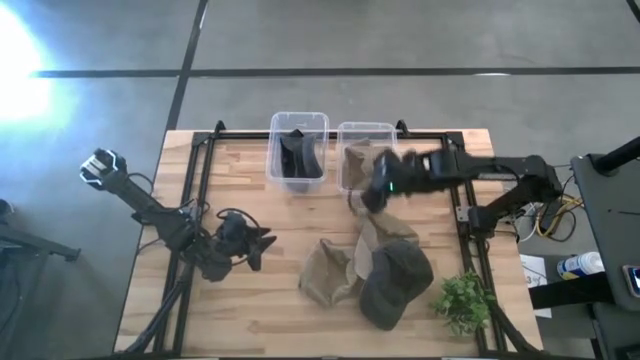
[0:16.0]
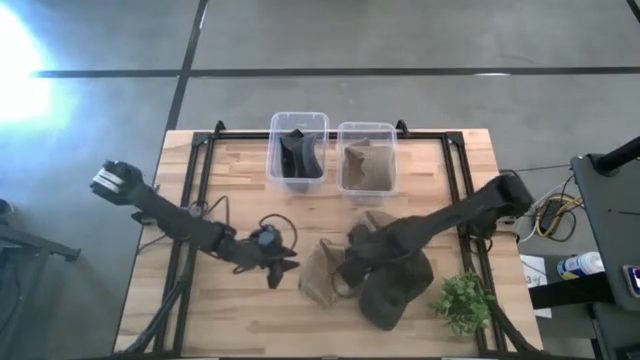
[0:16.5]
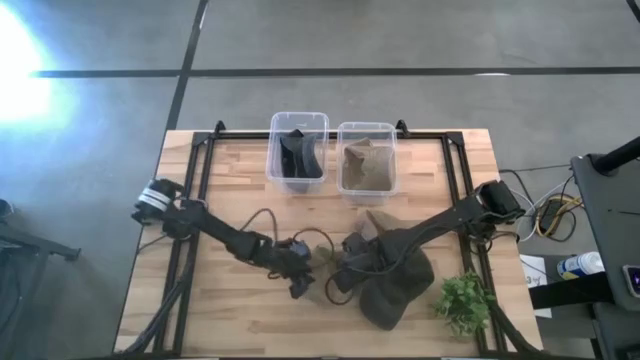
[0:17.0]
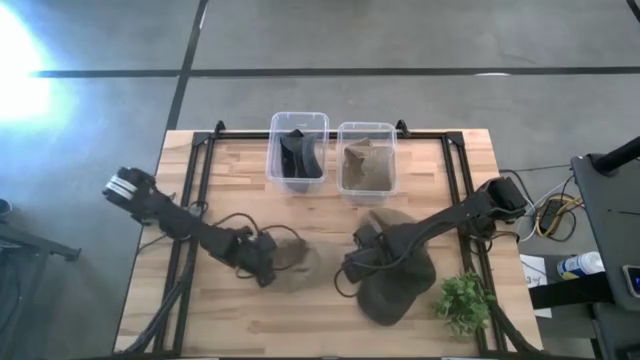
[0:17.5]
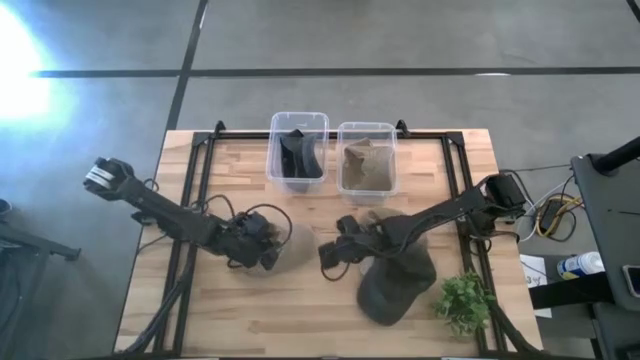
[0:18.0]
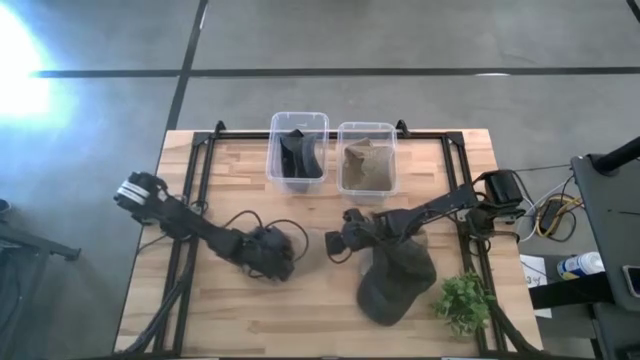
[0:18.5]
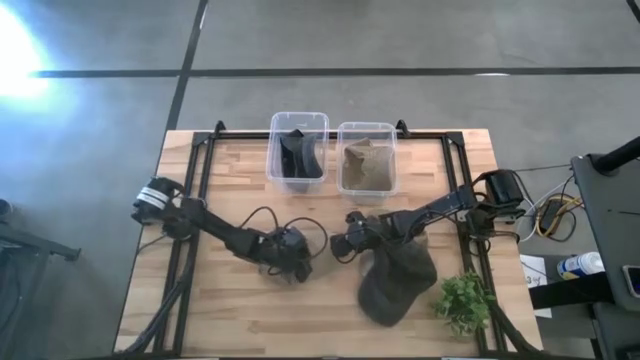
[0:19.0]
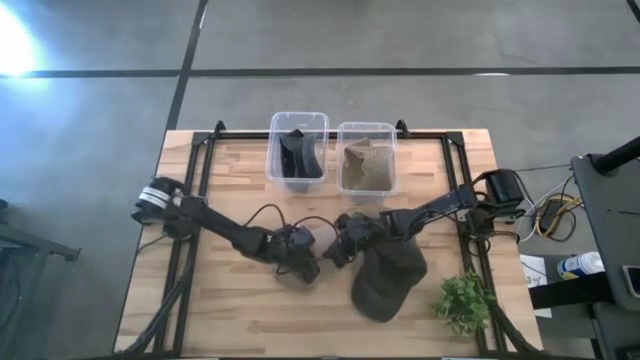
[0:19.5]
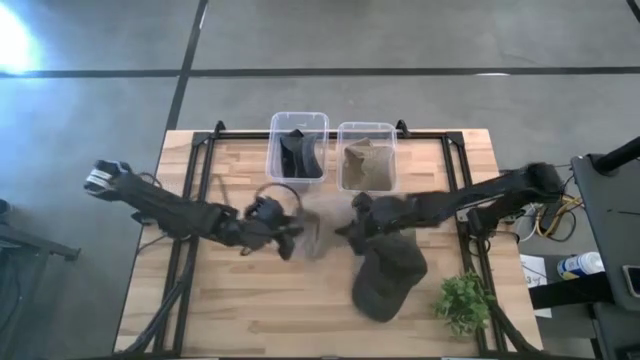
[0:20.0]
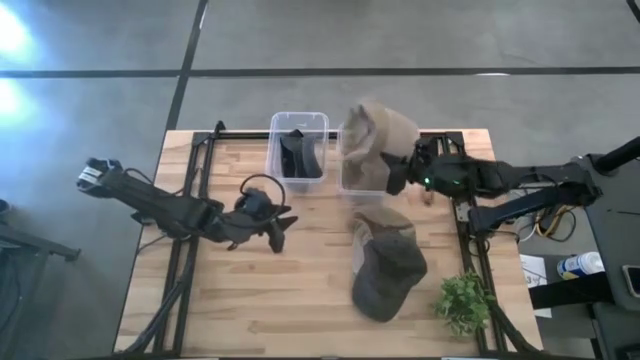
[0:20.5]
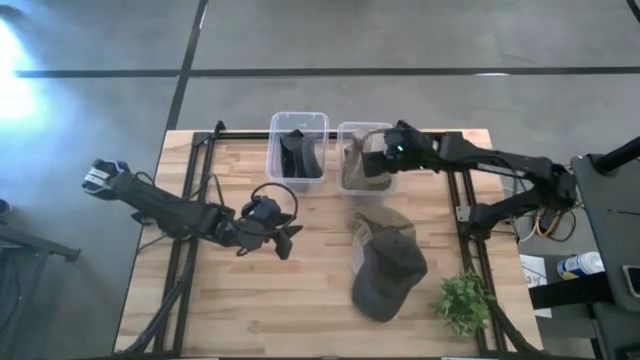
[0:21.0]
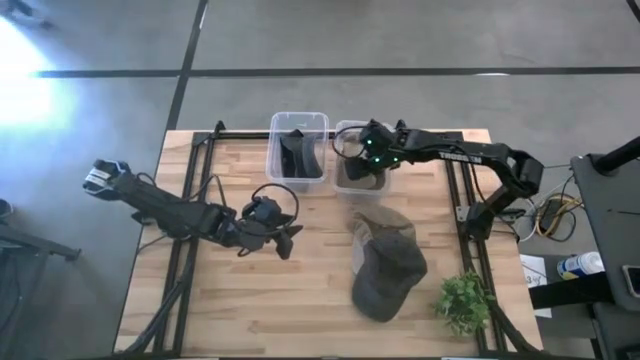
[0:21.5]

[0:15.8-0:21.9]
Task: Pick & Place hat
Put the left brown cap into the right transparent bin

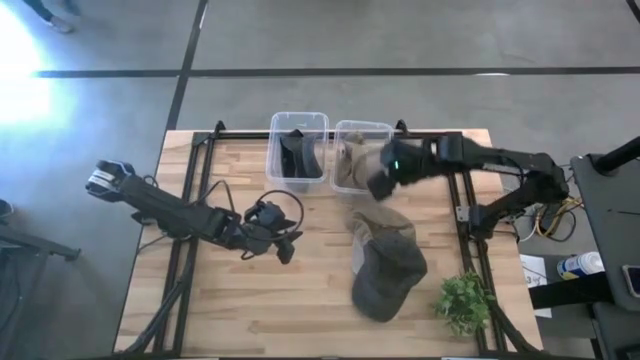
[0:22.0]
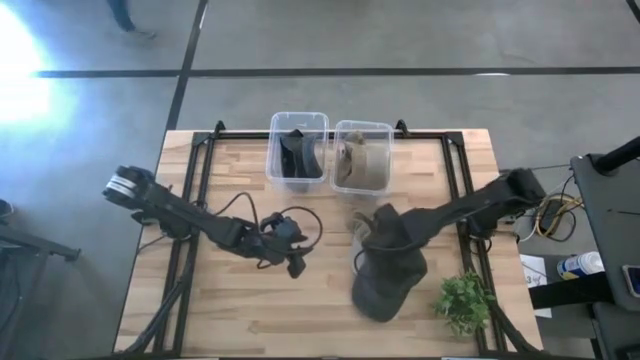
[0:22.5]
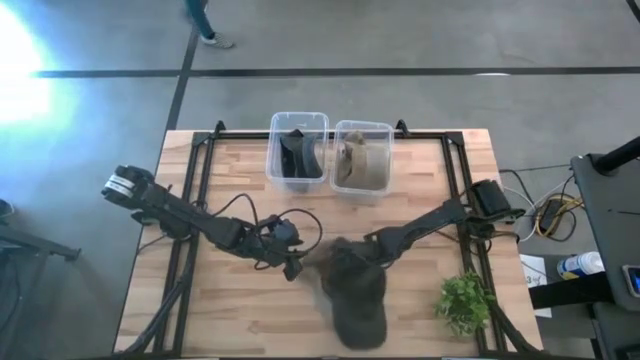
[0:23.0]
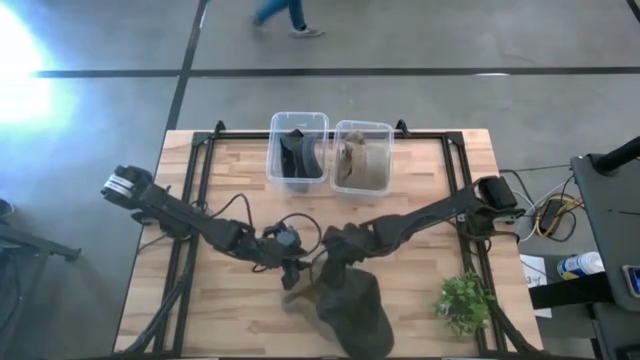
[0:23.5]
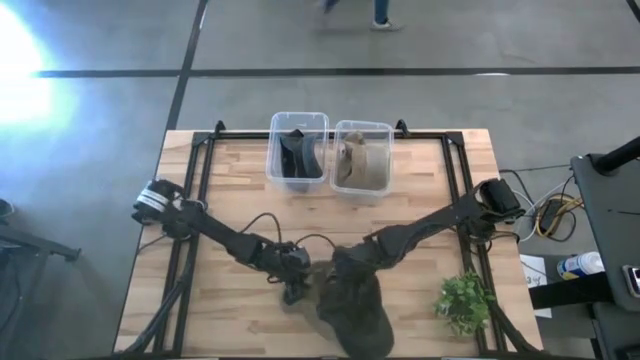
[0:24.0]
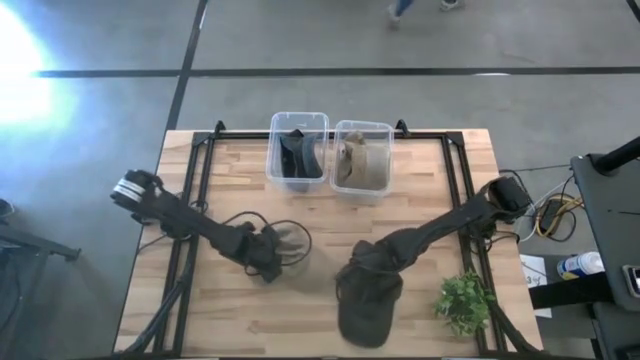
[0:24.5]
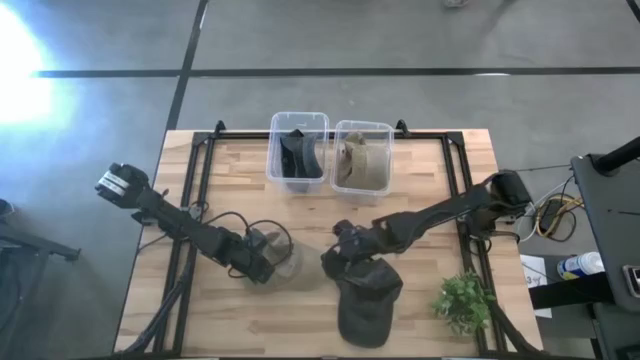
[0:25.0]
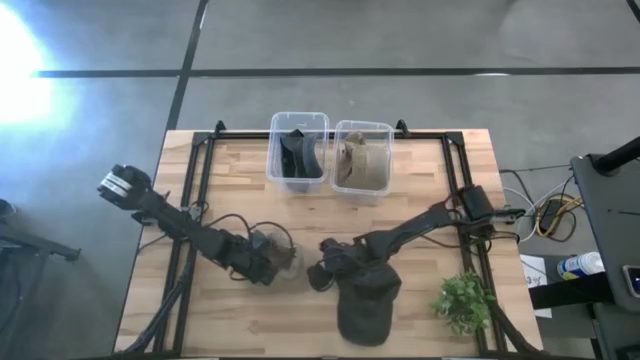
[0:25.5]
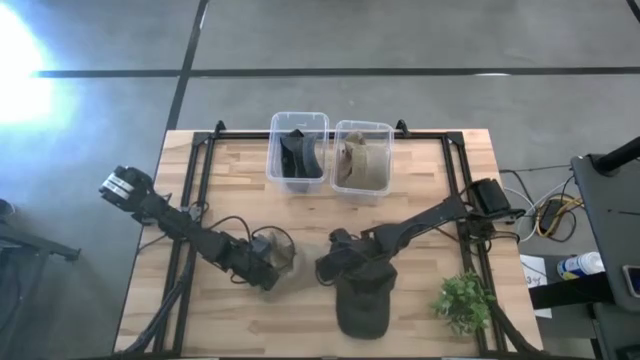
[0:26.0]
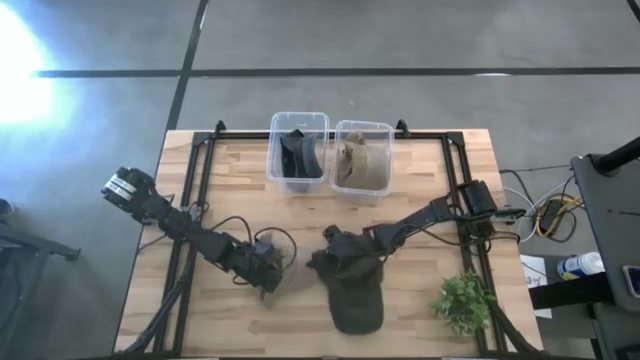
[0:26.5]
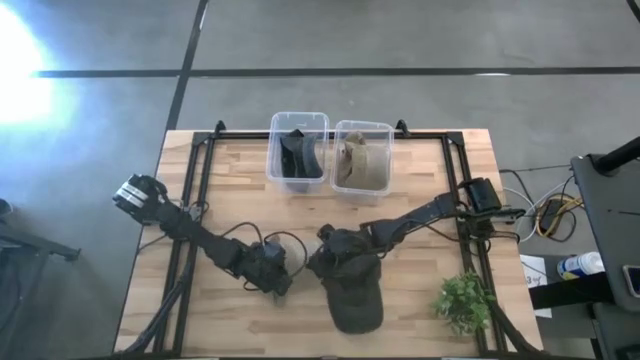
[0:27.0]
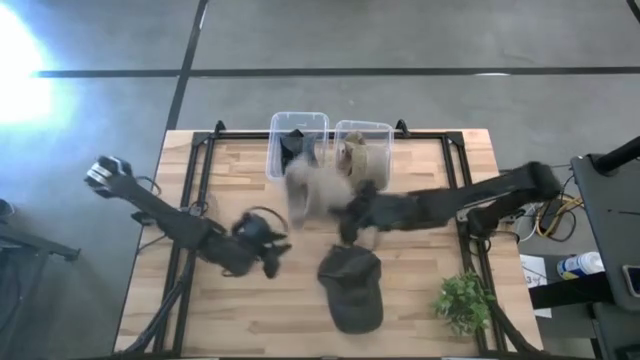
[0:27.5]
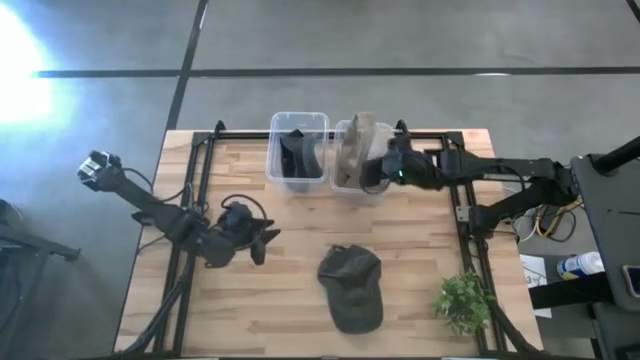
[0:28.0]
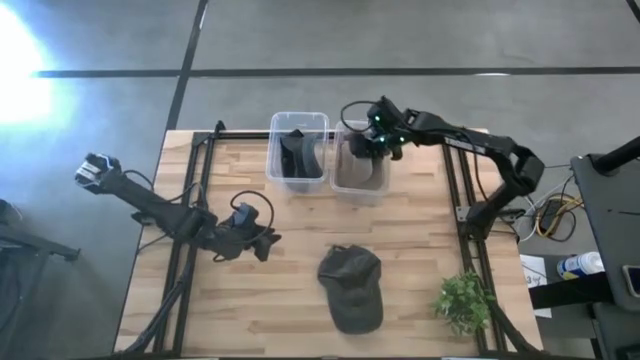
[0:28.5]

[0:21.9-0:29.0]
Put the brown cap into the right transparent bin

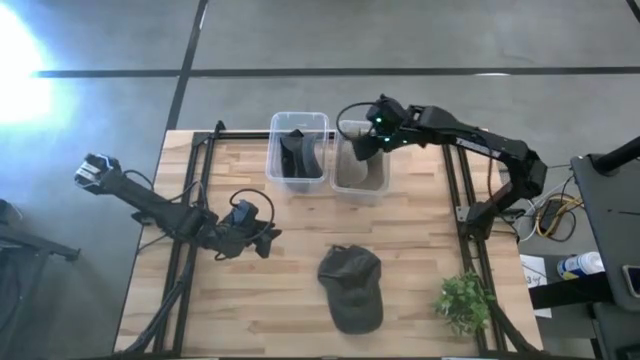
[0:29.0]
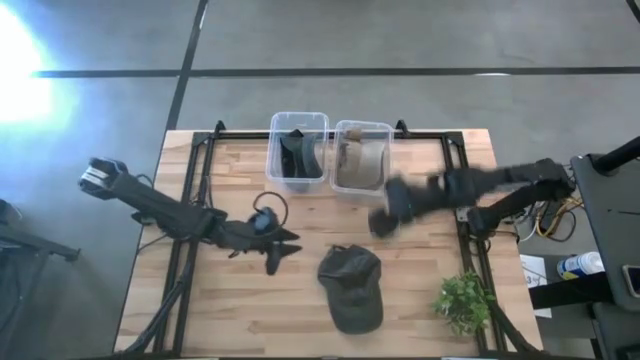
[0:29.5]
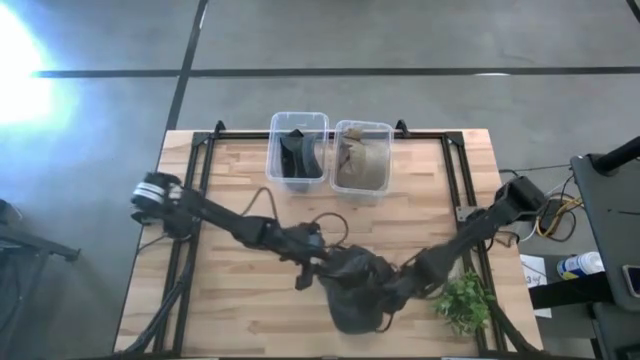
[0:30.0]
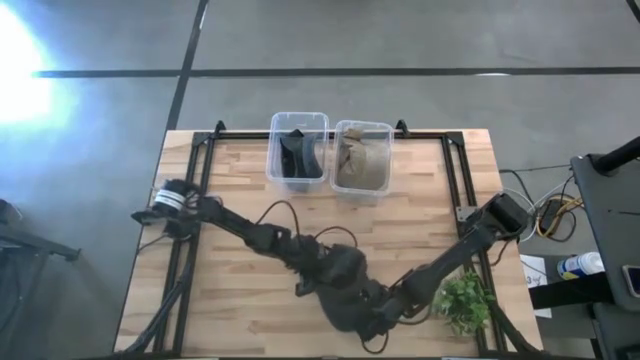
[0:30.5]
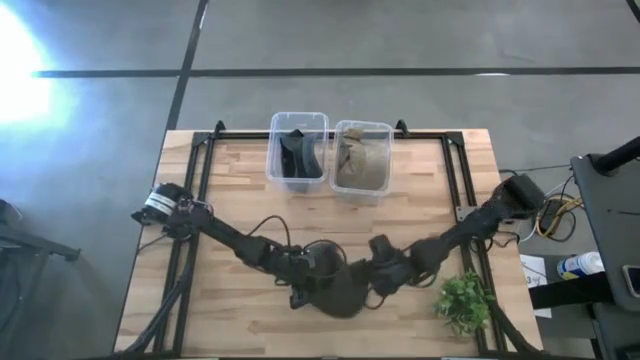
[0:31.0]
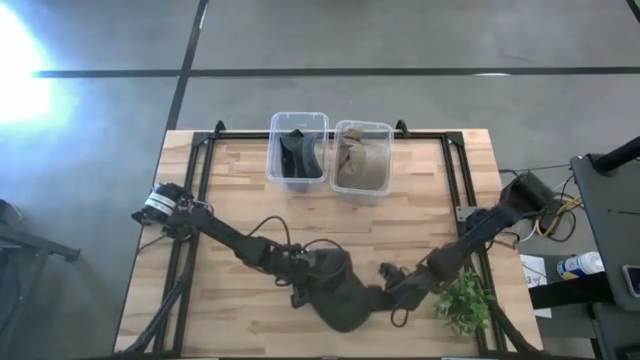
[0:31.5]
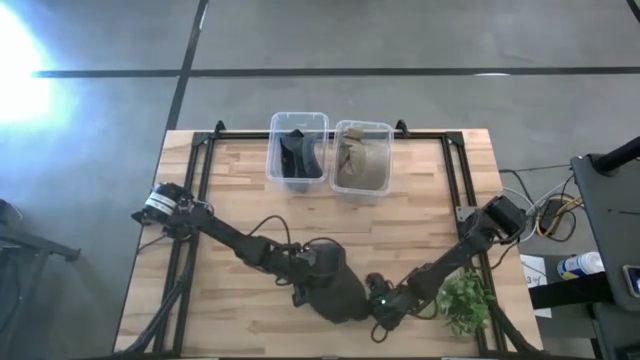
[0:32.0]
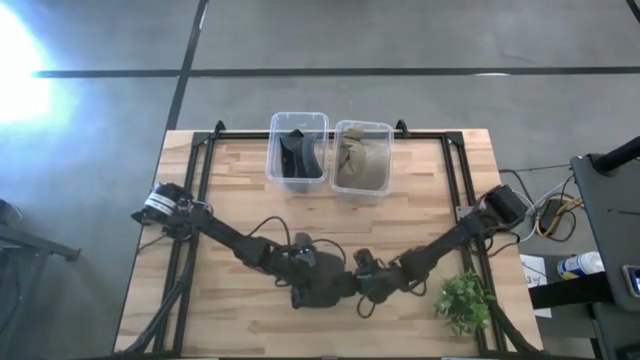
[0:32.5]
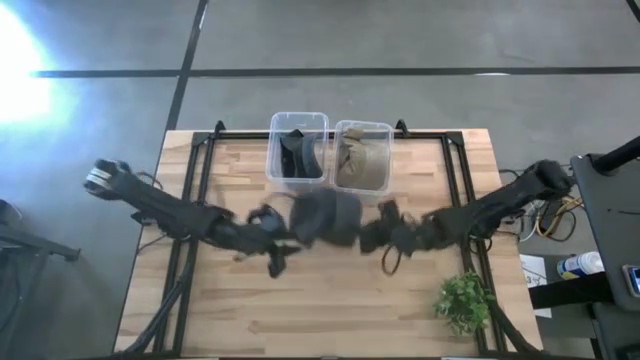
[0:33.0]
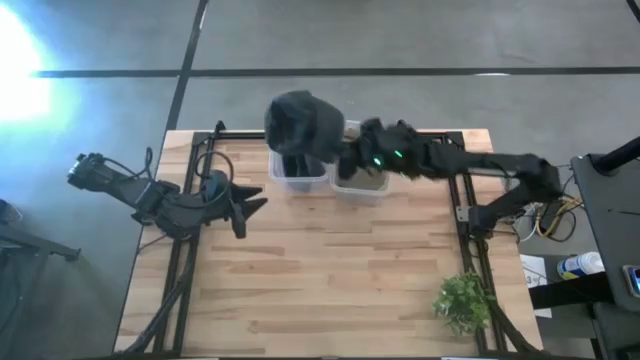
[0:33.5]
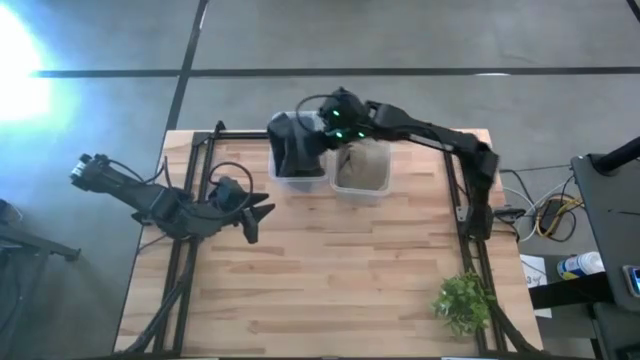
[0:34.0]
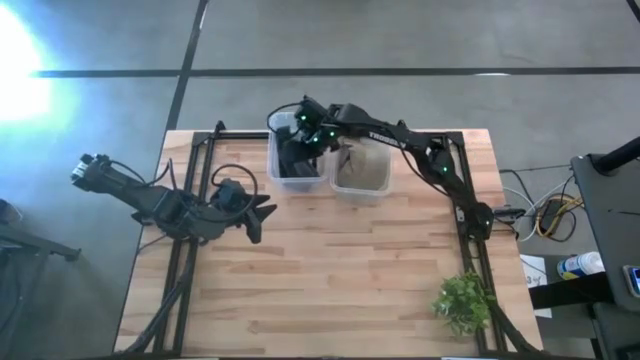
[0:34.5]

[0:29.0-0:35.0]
Put the black cap into the left transparent bin
